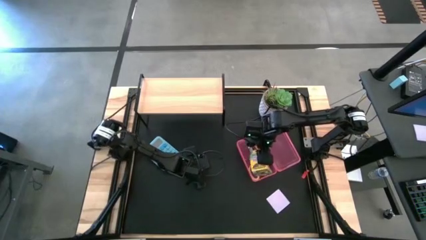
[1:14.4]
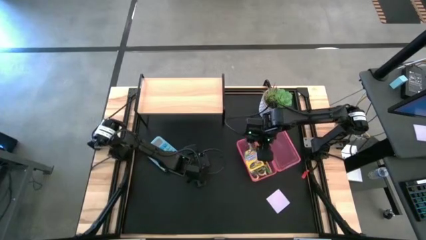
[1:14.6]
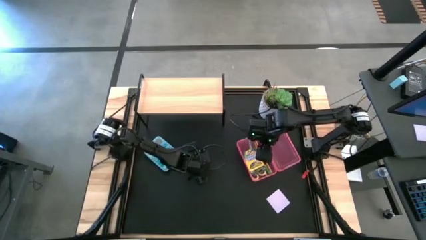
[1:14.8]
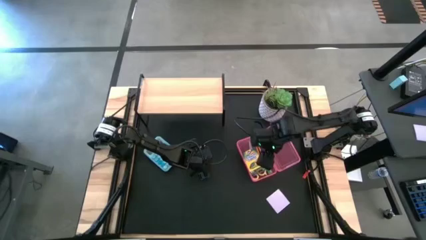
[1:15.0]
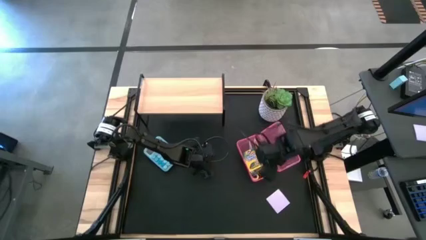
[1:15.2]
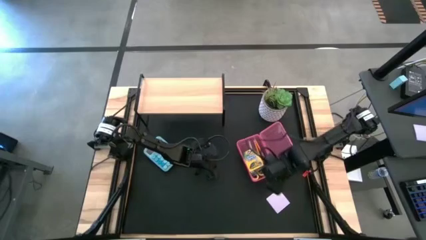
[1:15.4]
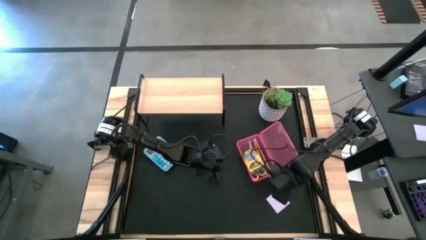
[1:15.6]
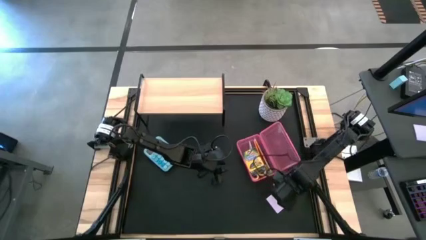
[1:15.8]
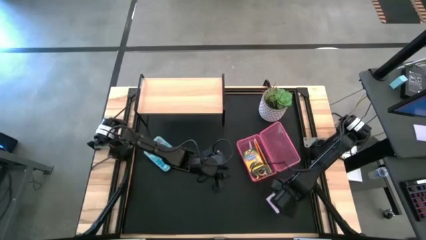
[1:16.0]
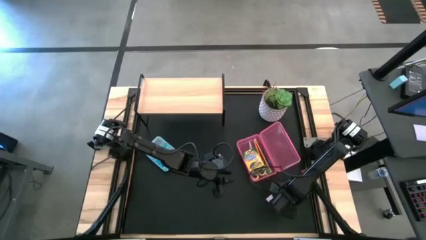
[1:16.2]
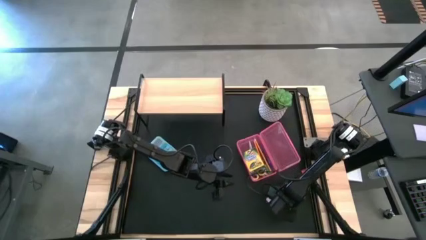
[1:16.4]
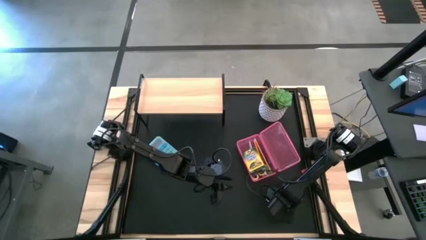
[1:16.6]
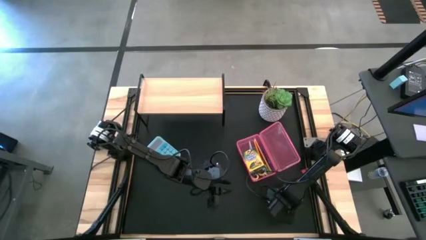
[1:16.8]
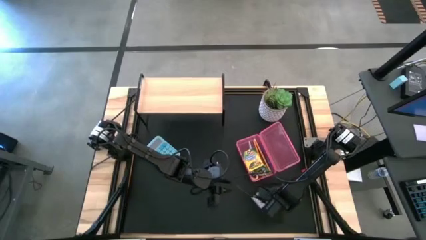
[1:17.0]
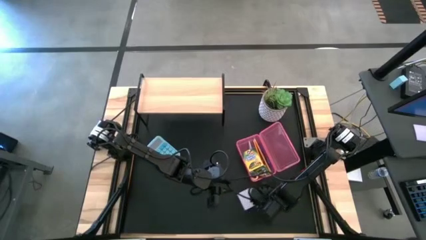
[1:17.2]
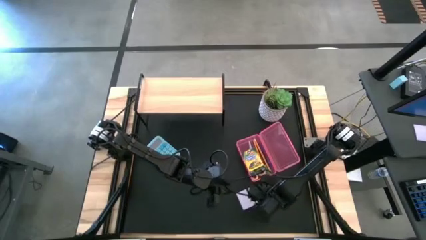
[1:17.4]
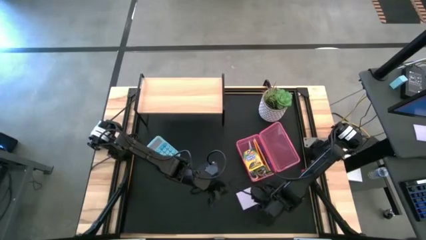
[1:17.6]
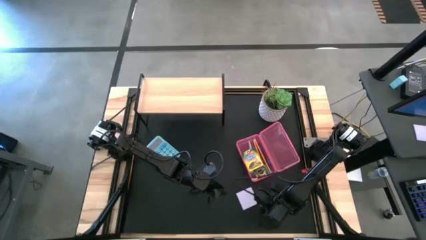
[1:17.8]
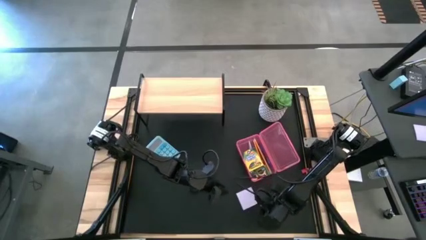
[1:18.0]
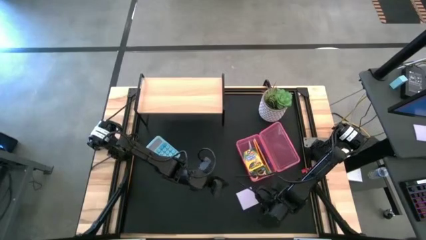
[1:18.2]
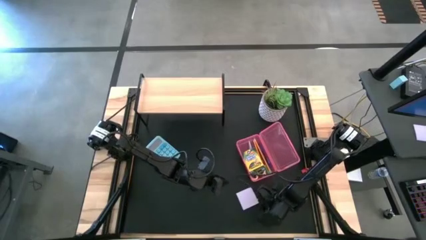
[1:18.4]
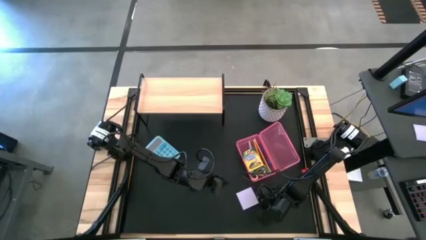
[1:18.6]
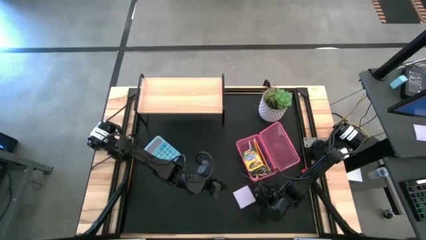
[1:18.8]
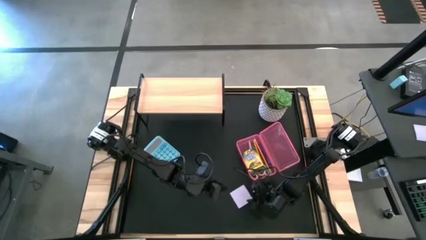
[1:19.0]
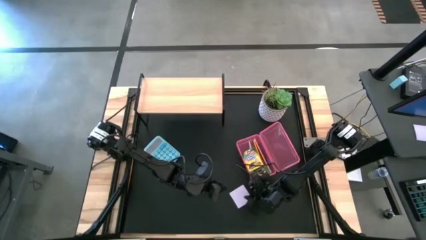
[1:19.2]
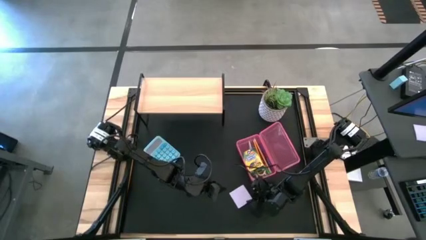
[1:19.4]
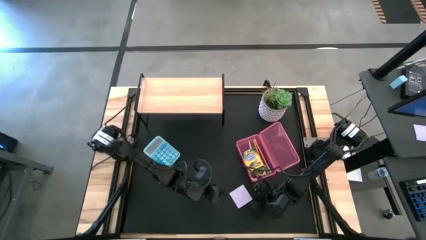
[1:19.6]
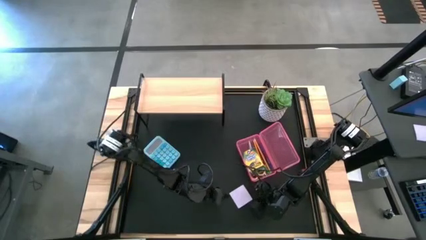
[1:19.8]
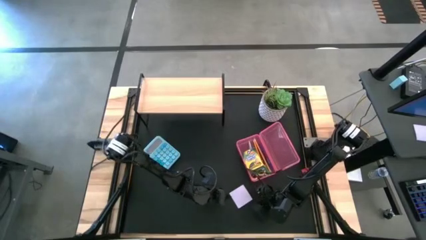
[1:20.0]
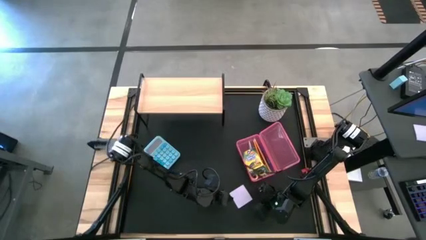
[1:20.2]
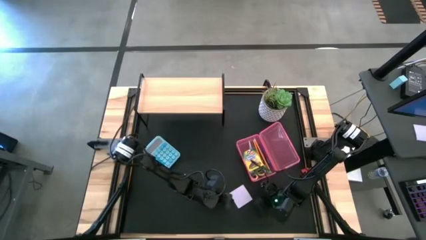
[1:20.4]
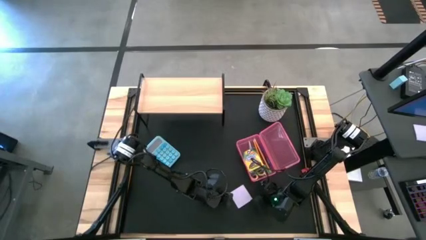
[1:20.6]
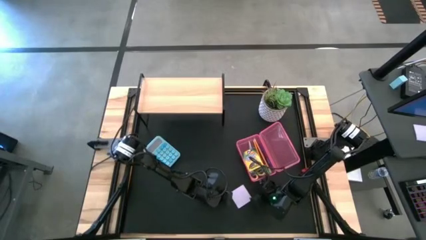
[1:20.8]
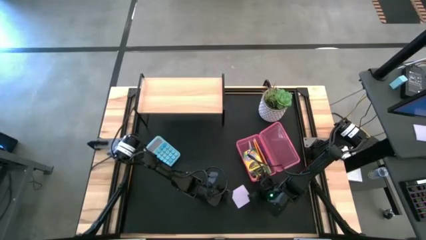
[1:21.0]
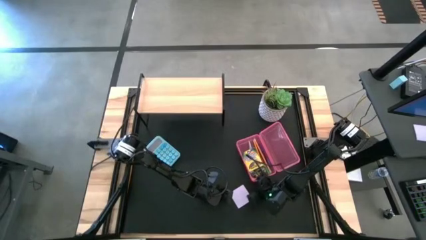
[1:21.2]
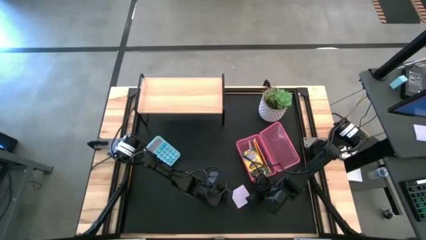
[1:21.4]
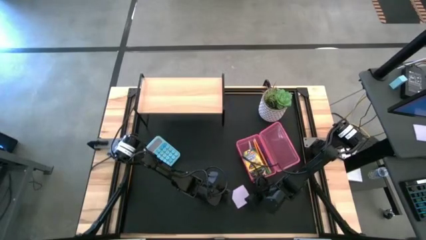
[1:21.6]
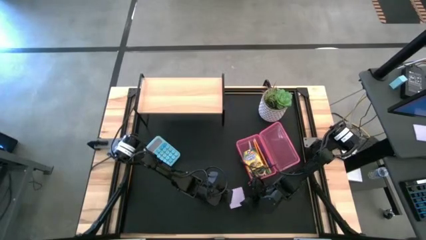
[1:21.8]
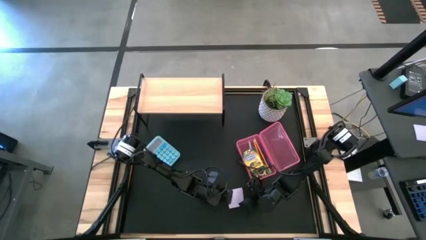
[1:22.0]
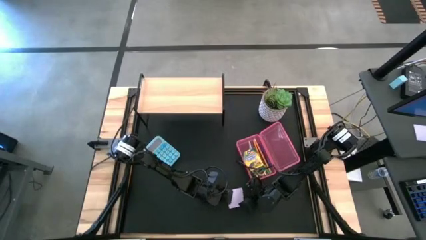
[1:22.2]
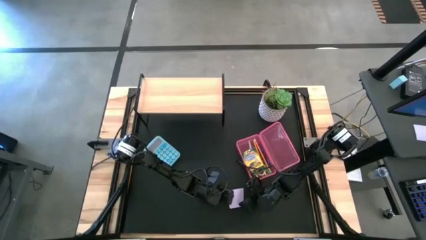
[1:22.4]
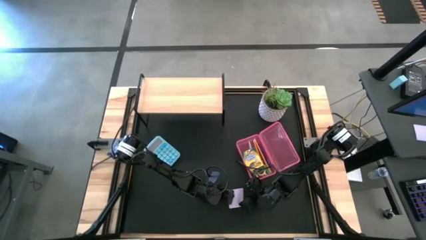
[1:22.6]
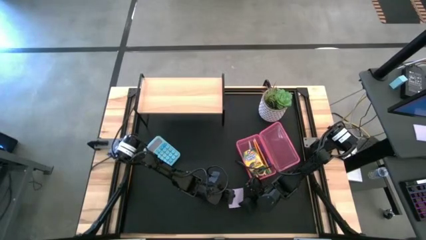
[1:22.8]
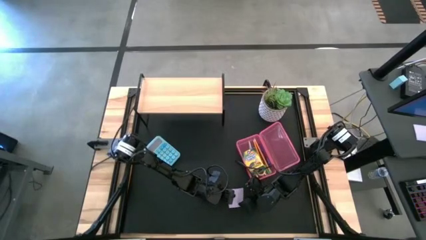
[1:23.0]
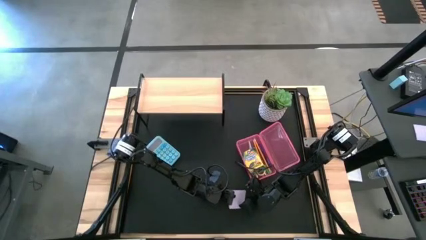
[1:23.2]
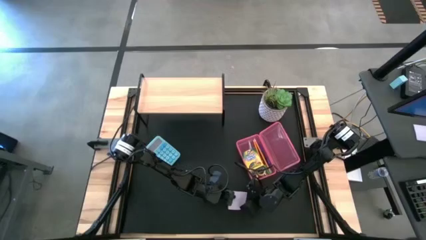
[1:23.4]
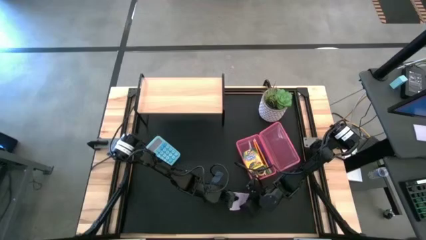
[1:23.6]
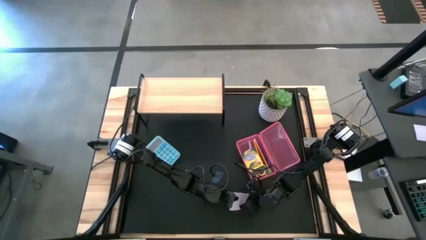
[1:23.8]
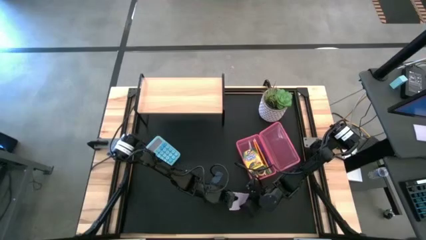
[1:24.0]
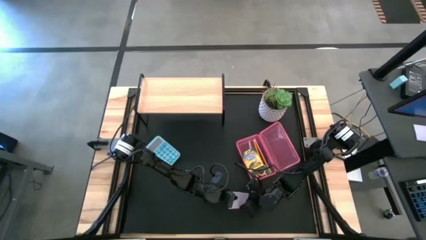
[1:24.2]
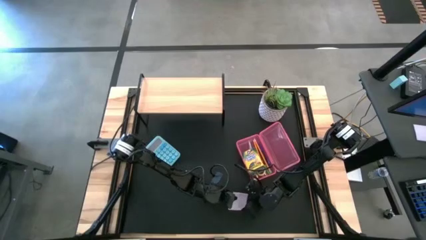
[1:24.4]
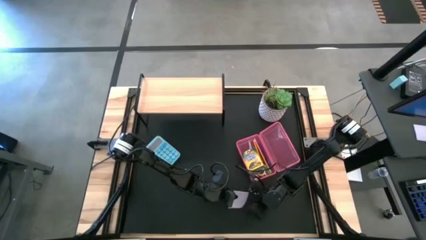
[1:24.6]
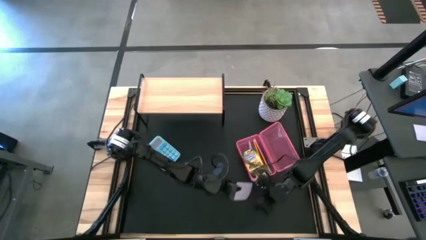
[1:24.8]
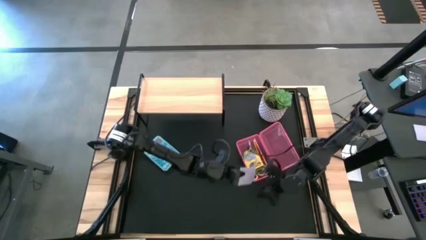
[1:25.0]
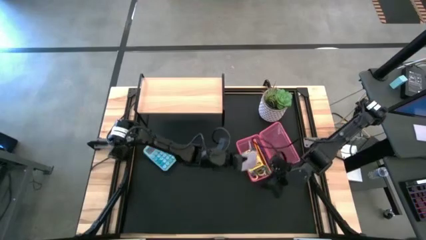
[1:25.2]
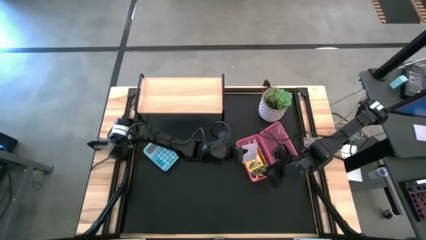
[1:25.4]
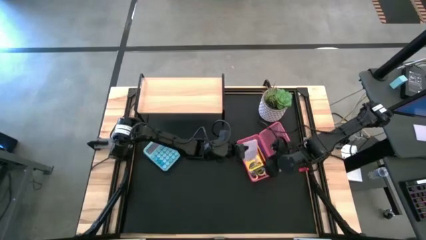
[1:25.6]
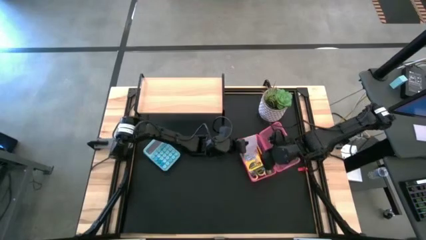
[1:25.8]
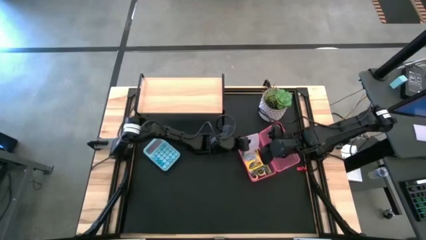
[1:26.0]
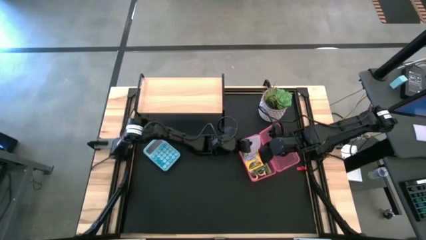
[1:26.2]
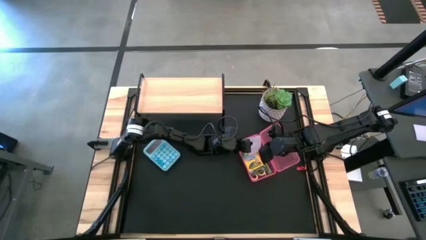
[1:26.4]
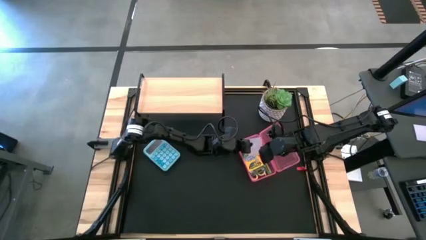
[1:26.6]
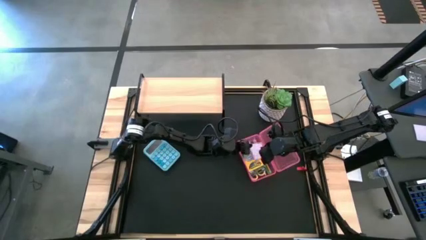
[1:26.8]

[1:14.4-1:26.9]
Task: Pack school essentials
Put the purple sticky notes into the pink supply box
